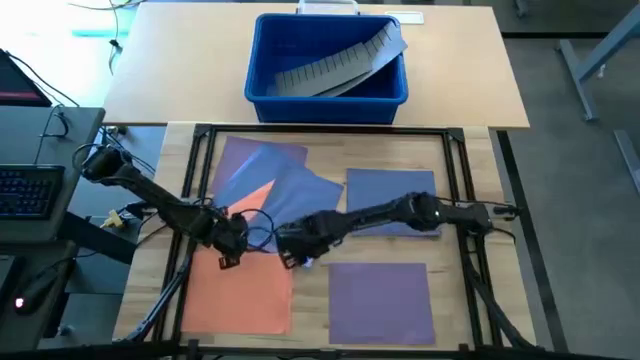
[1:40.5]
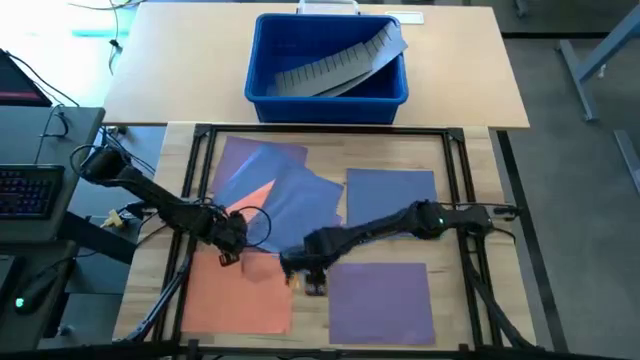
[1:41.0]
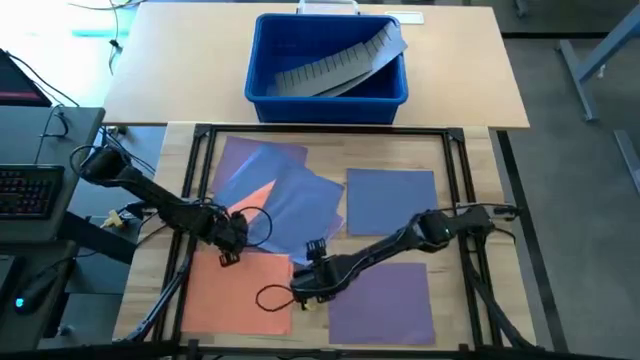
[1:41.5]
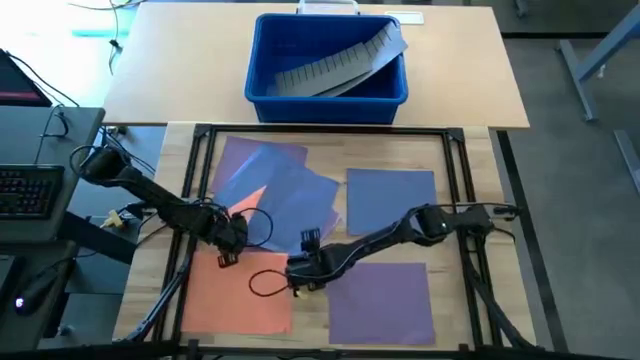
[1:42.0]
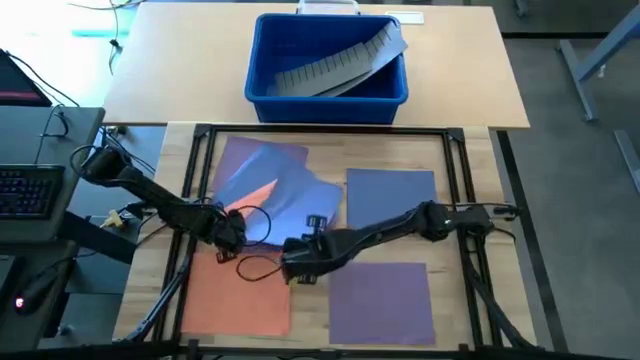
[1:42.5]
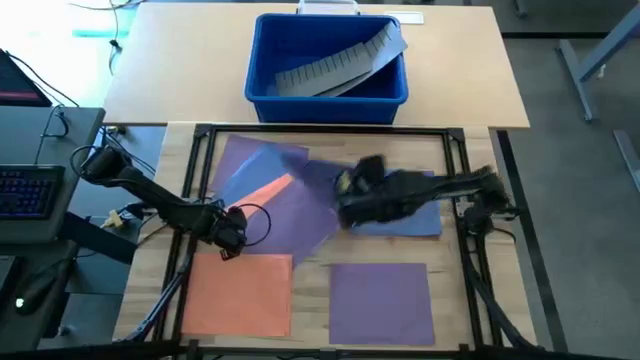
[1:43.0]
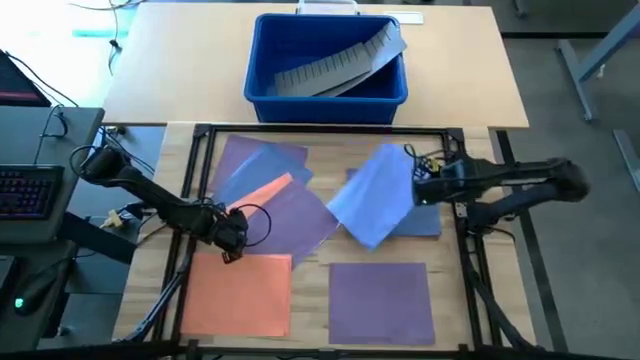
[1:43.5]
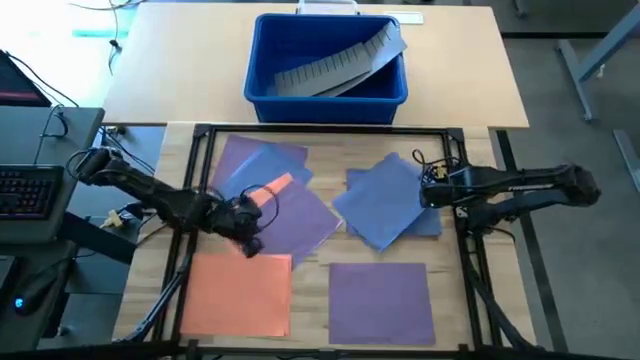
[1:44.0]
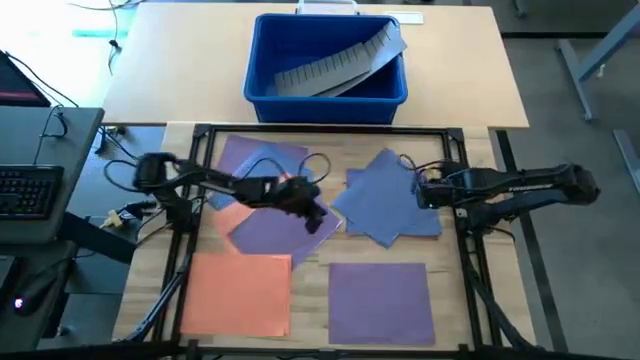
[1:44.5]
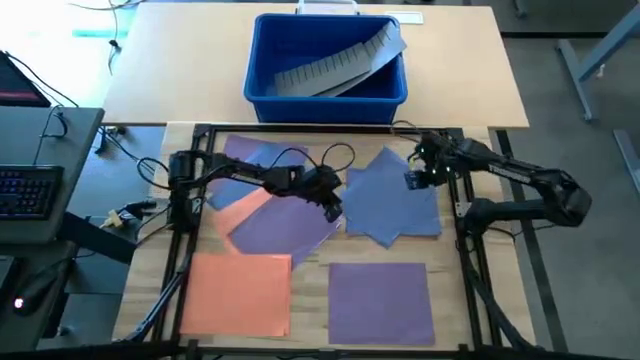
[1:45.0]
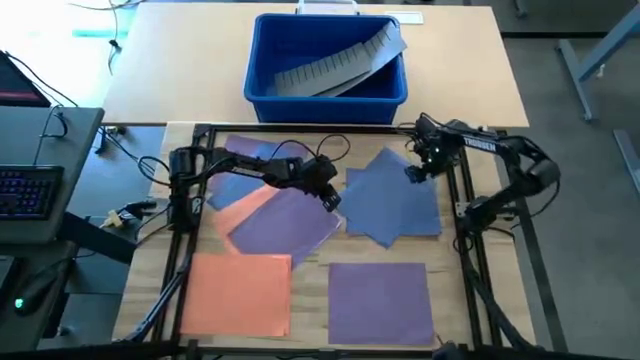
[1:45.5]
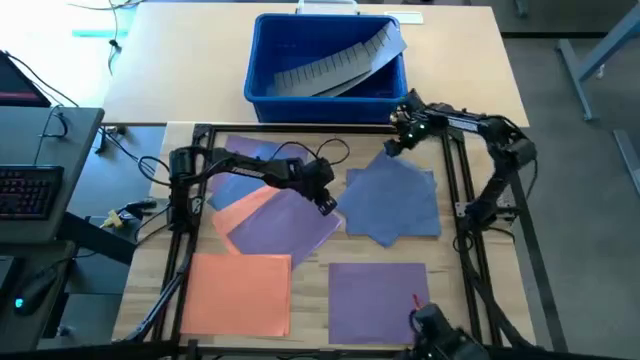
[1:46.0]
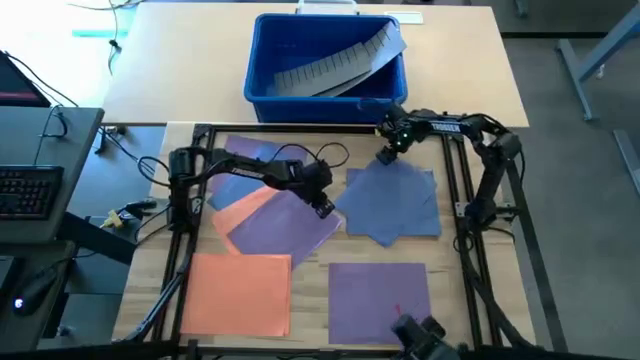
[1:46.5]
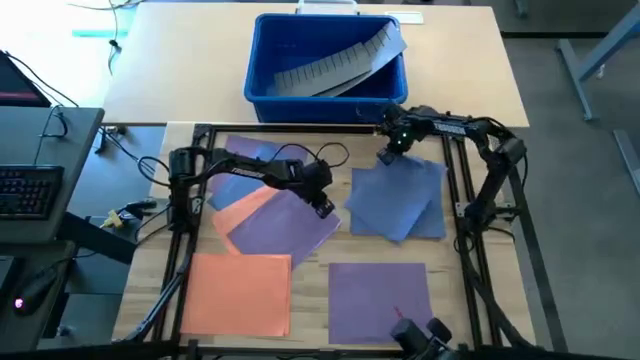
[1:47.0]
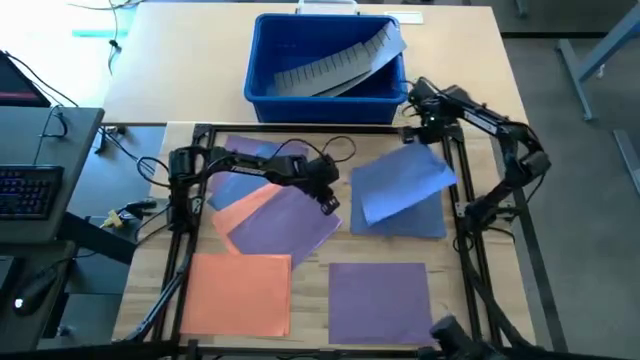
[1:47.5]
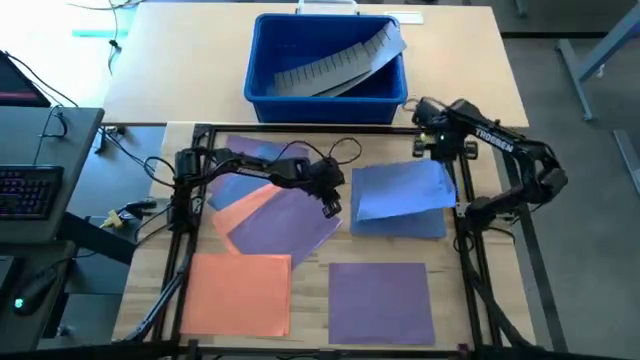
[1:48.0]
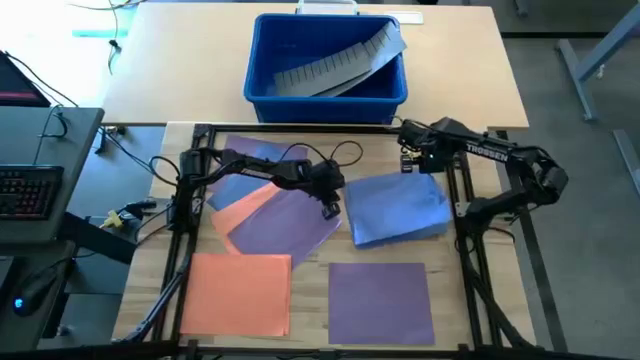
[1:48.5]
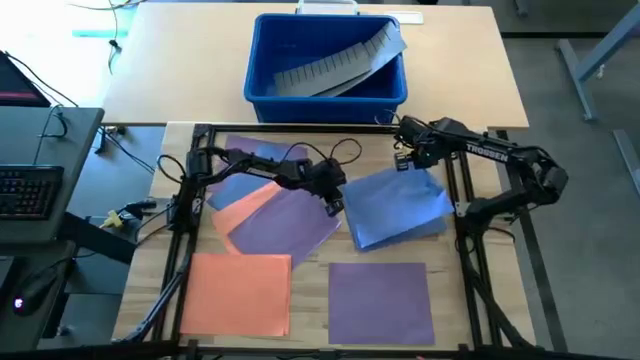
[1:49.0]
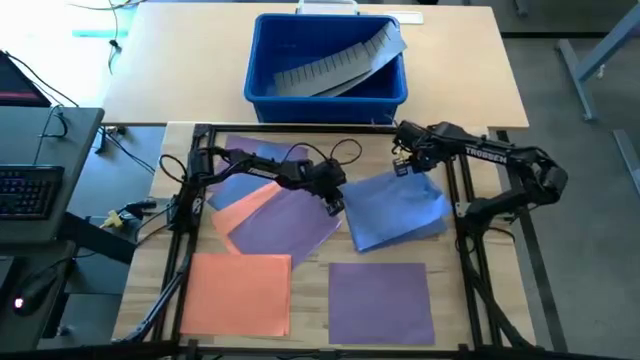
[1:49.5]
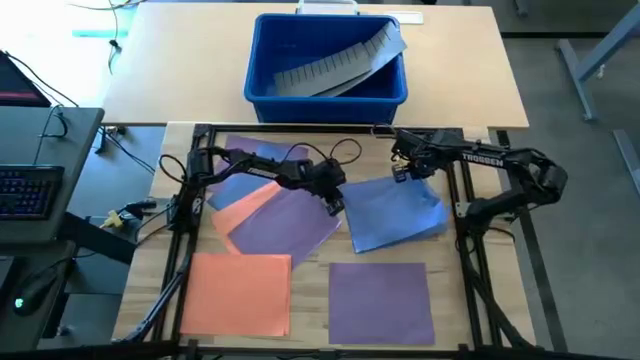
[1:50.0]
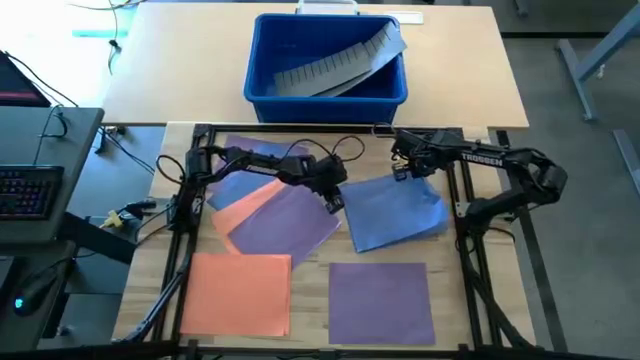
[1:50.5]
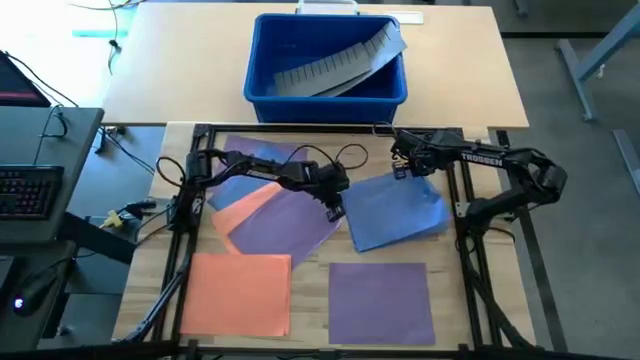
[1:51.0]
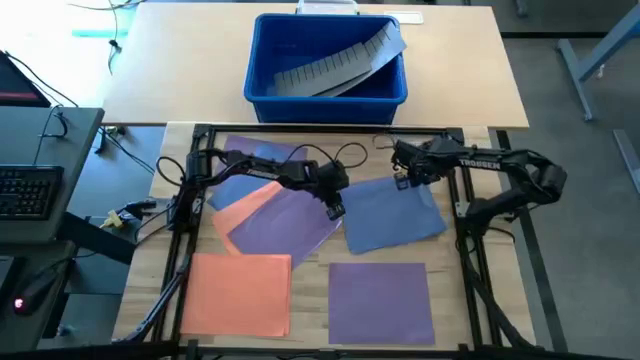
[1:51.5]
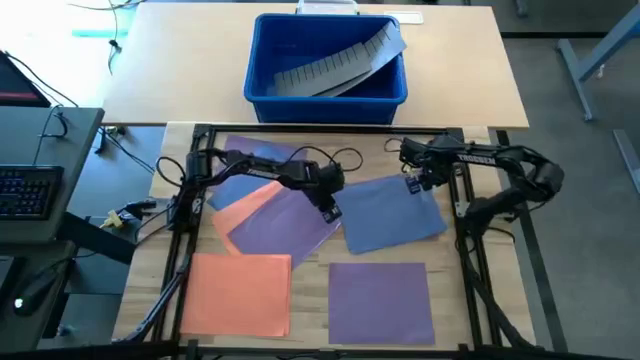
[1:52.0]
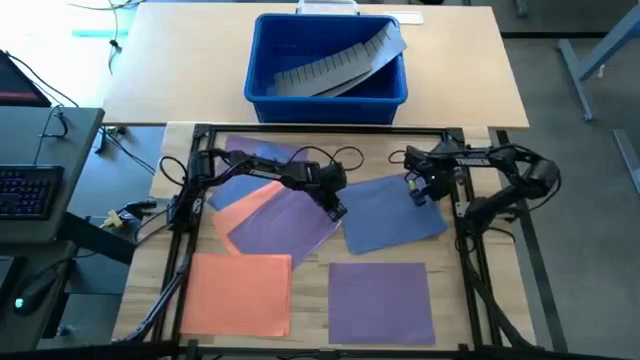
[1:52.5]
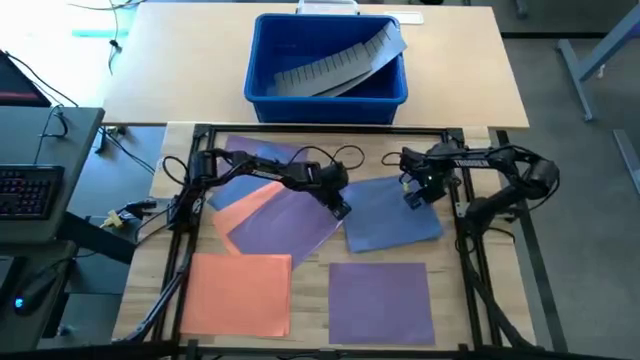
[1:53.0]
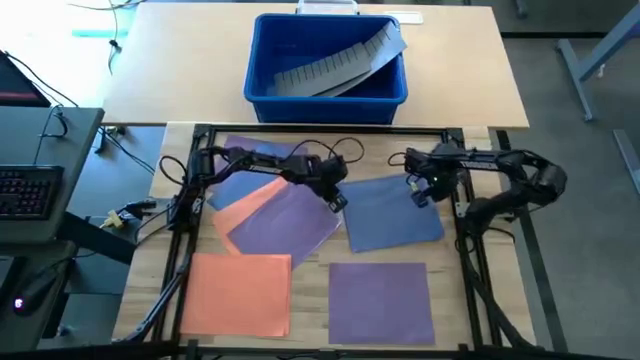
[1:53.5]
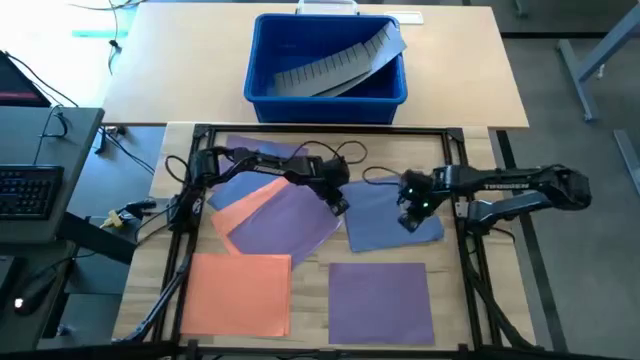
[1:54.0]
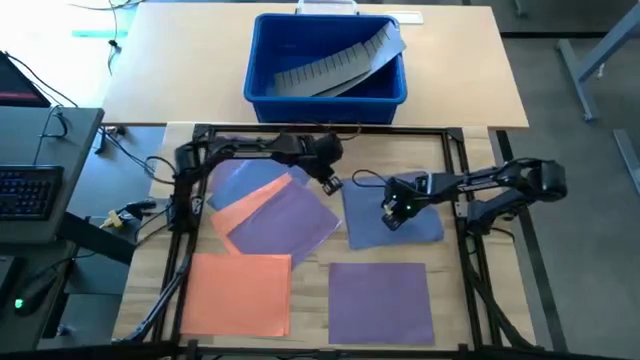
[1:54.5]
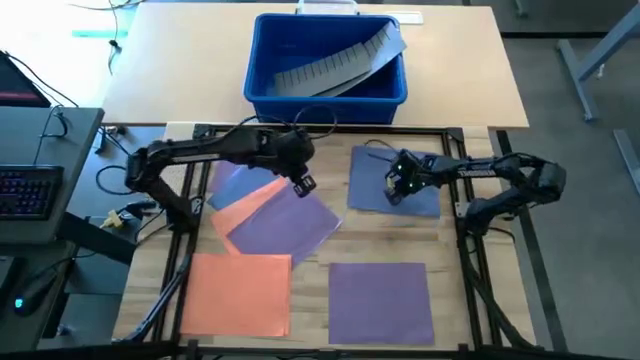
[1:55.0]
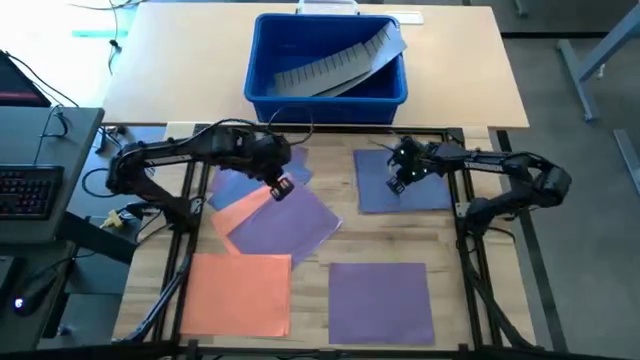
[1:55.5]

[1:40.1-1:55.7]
Task: Organize paper
Stack the blue paper on top of the blue paper

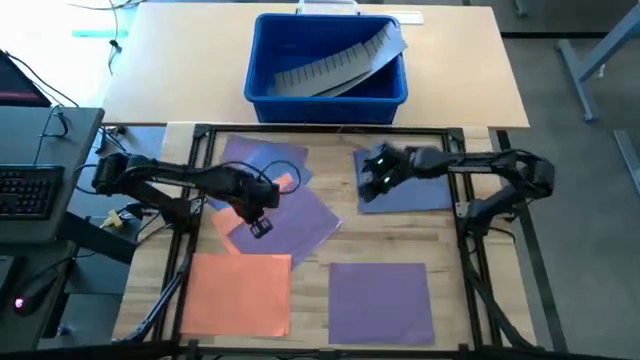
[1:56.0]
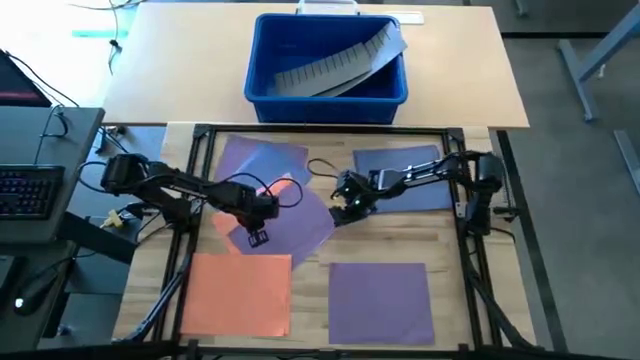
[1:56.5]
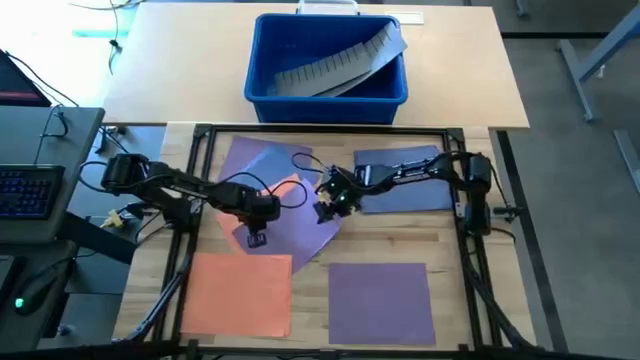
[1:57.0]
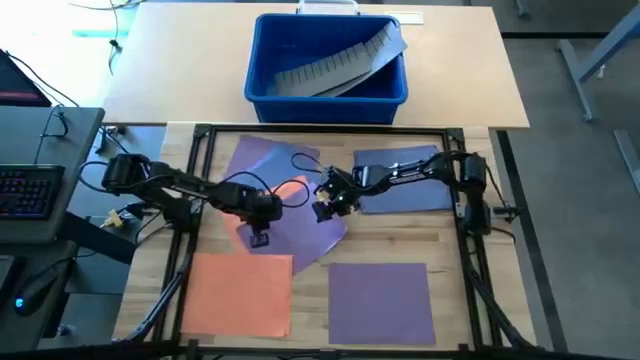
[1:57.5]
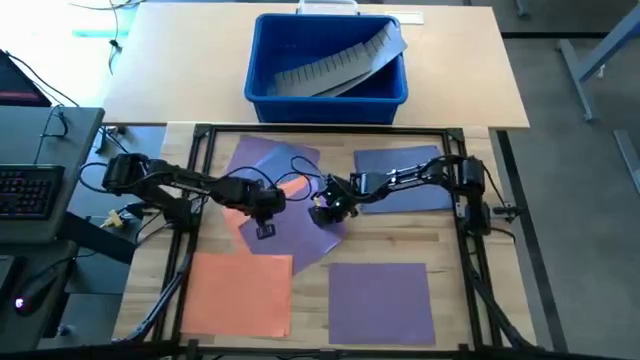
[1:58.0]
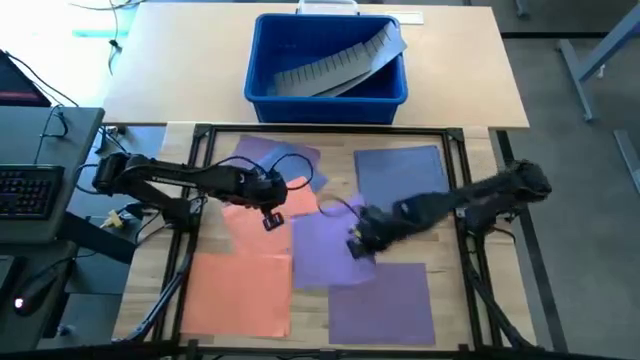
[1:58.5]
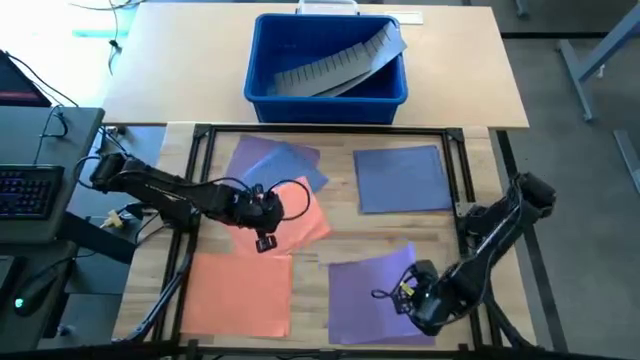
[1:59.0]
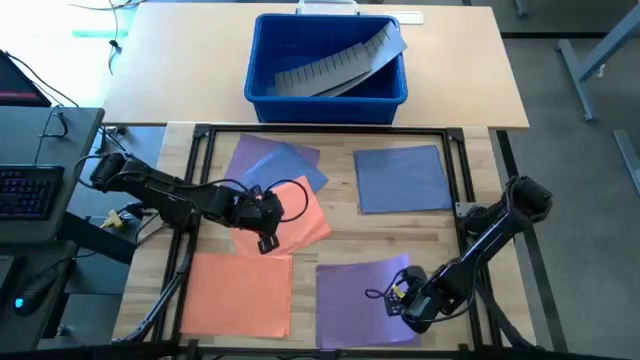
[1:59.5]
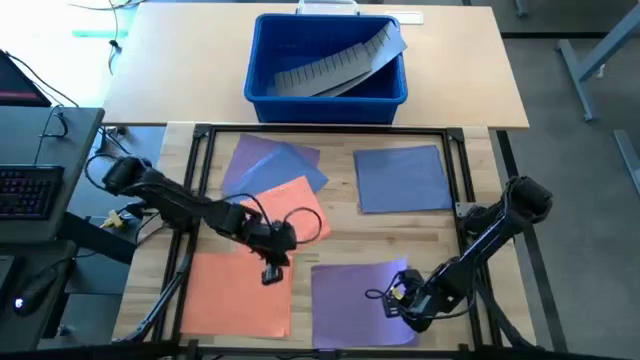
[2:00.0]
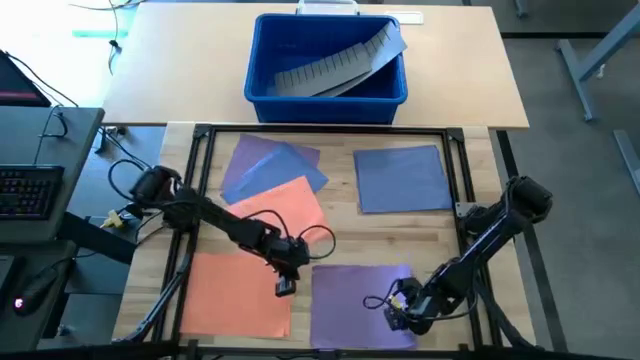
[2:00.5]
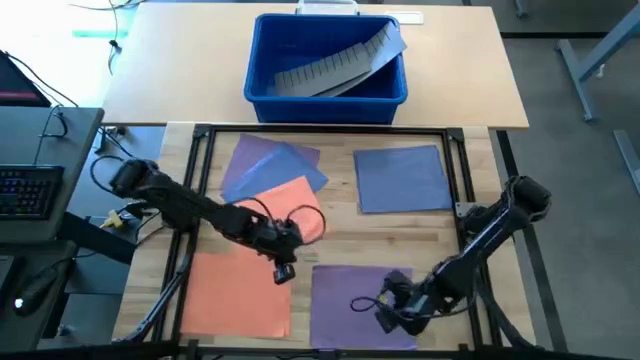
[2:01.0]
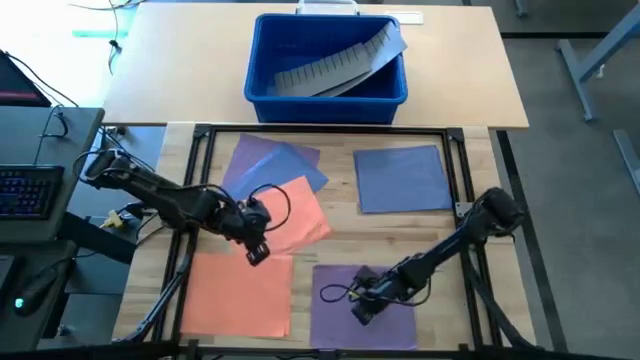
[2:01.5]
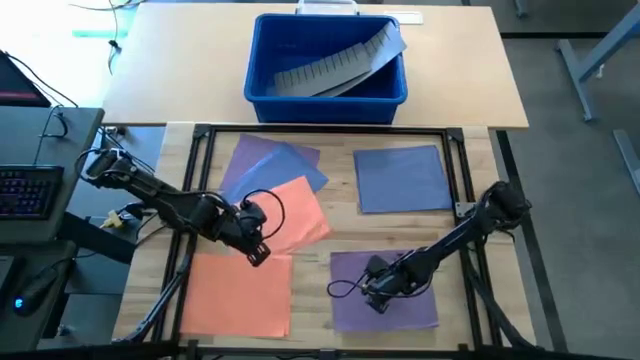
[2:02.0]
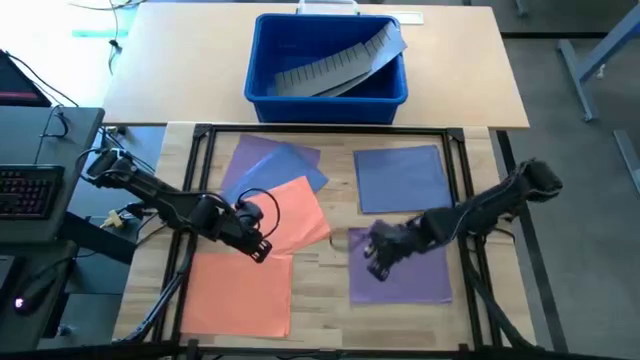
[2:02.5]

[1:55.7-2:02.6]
Stack the purple paper on top of the purple paper
